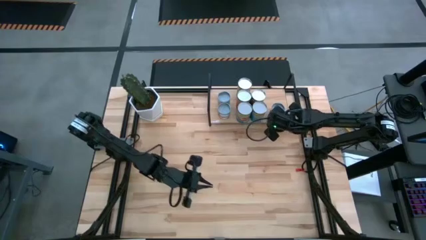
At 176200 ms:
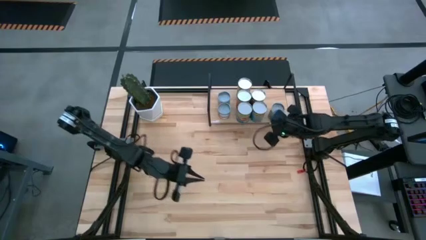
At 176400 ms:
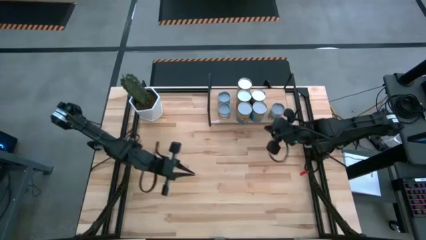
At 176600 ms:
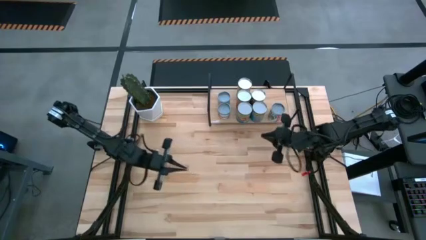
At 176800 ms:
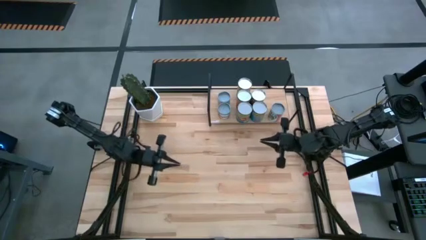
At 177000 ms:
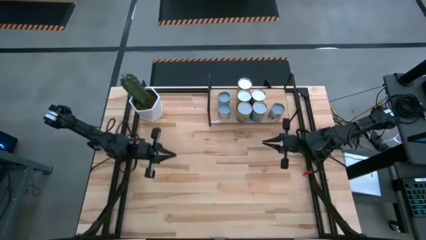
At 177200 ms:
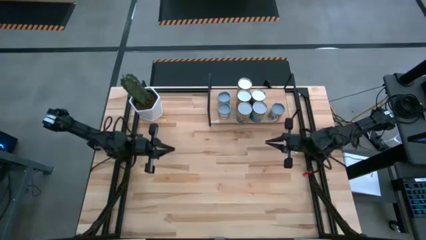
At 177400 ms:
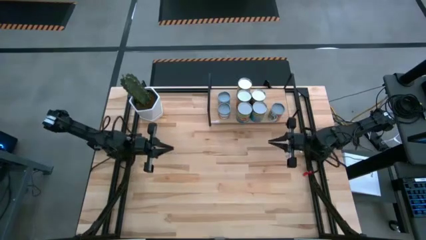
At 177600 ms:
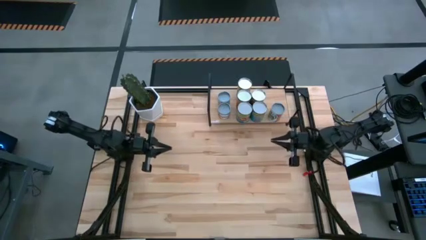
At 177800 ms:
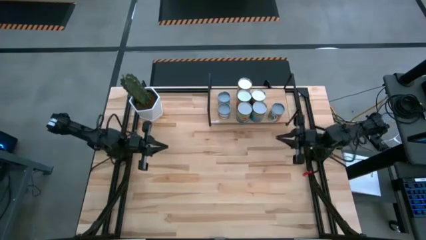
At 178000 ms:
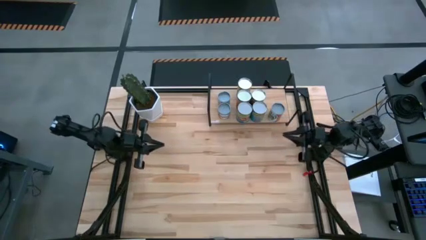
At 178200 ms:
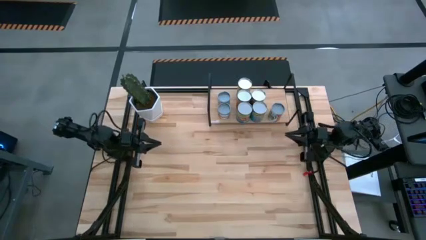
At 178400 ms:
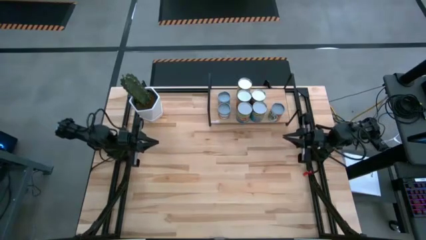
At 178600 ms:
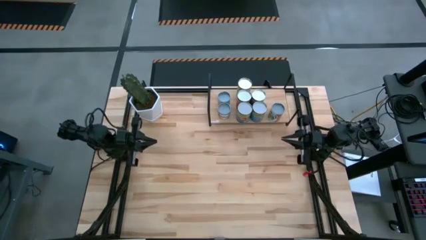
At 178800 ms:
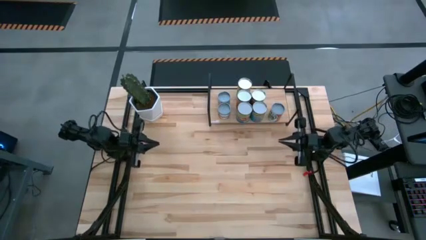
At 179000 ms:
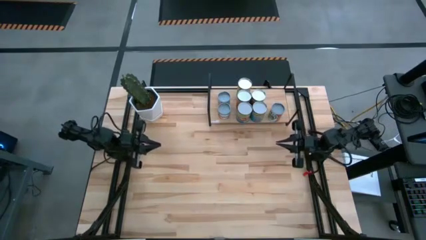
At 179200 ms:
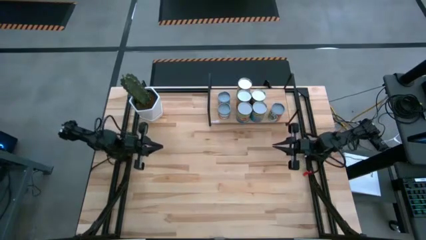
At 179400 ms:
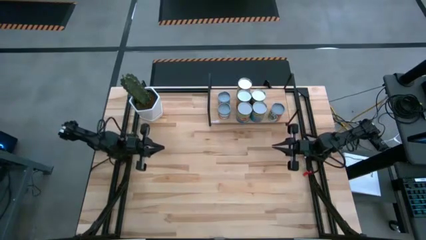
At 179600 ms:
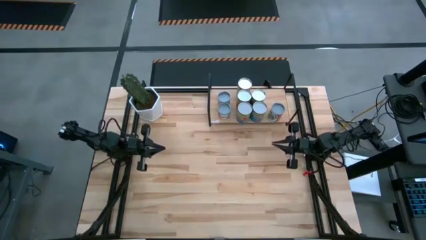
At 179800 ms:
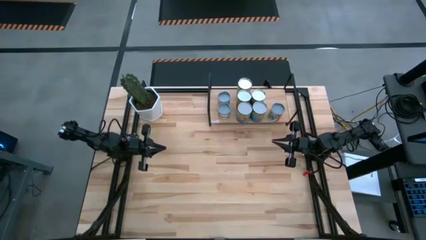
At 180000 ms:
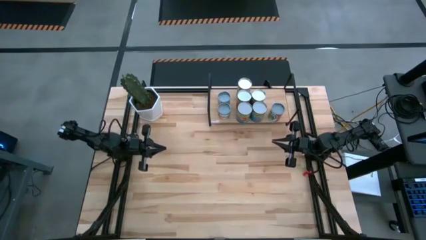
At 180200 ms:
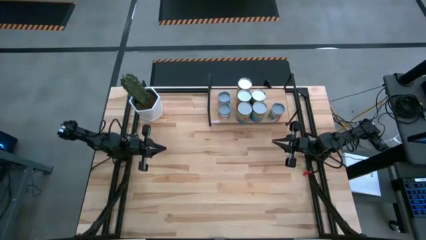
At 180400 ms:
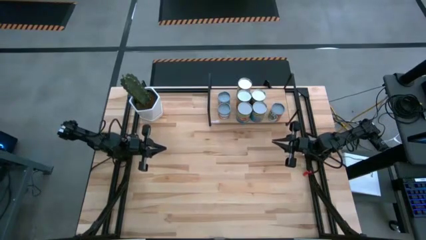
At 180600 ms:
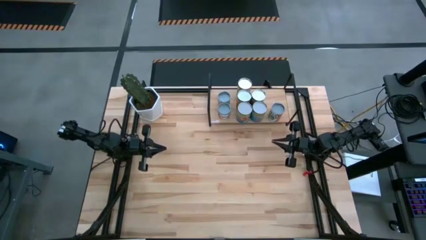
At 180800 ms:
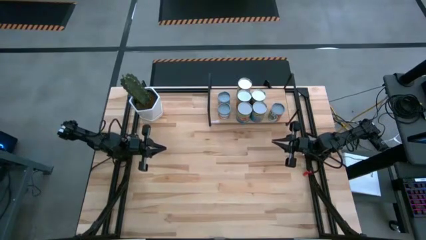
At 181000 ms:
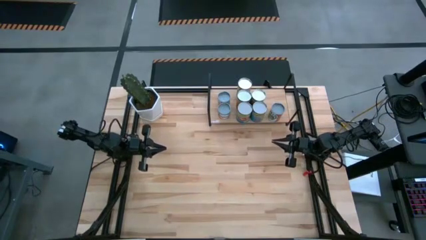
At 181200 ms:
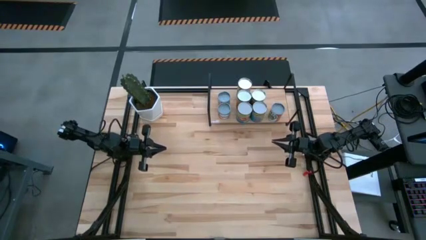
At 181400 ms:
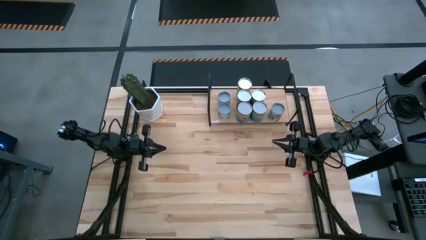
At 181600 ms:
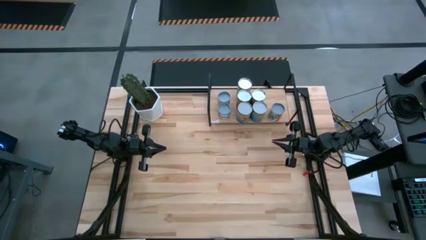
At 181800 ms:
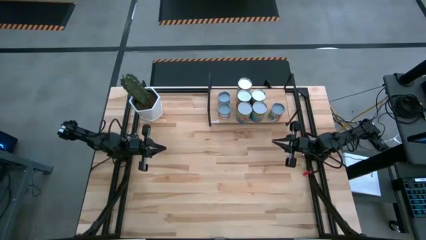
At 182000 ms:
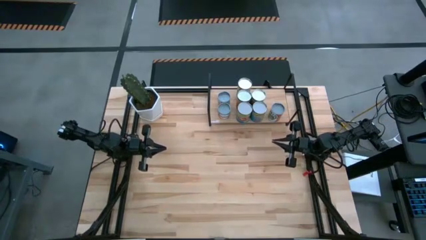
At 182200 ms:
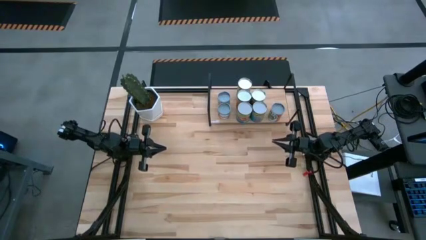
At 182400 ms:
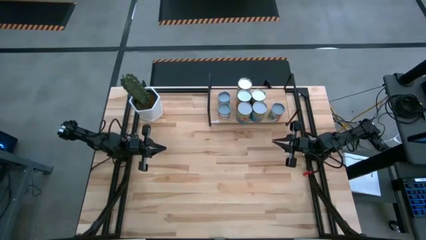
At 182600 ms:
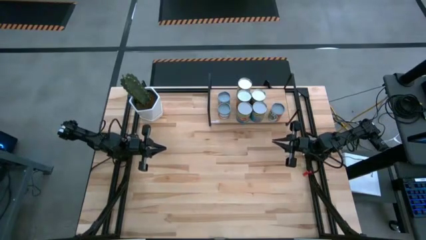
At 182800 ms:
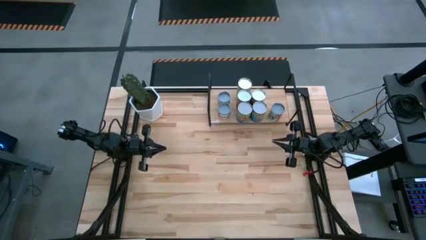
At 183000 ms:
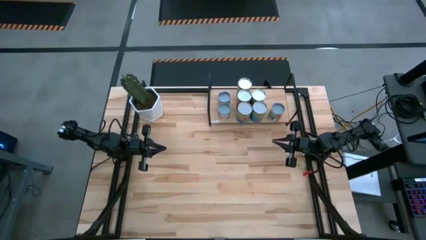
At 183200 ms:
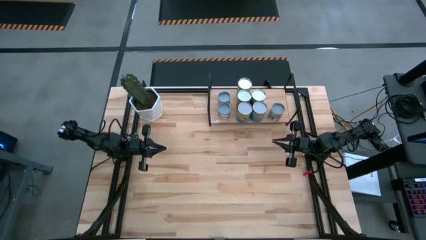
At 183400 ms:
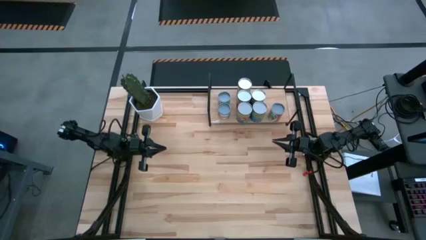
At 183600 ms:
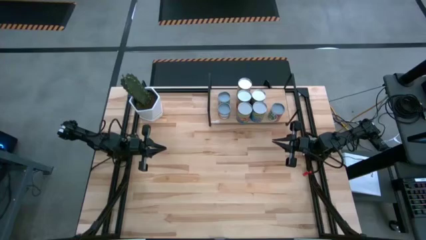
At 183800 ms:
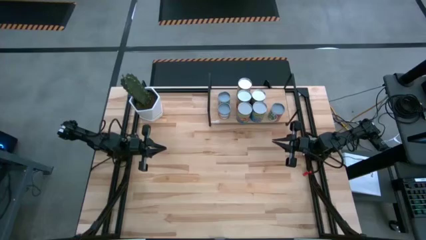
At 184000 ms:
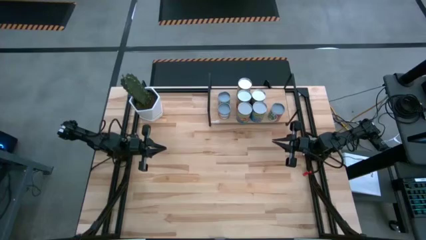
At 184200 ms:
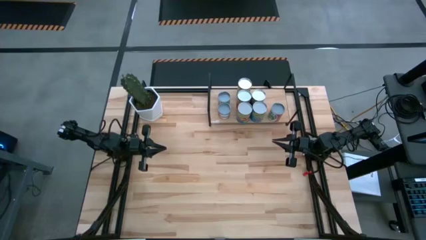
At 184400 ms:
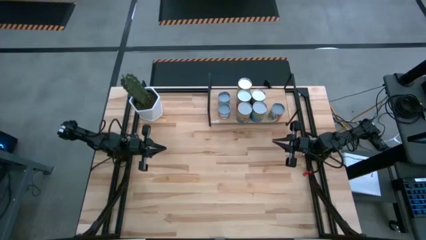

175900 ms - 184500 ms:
Task: Pick and place cans onto a shelf
Return to Home Position
